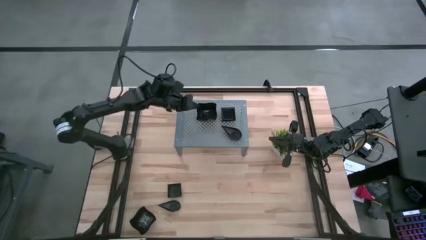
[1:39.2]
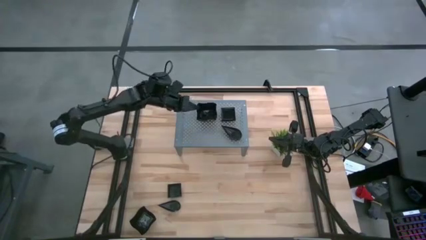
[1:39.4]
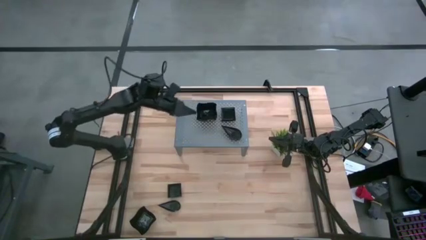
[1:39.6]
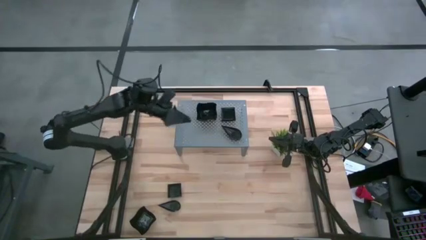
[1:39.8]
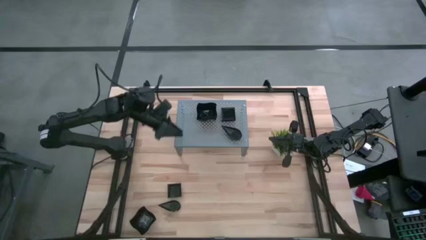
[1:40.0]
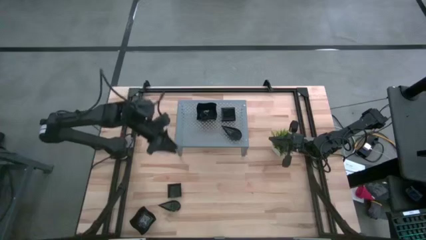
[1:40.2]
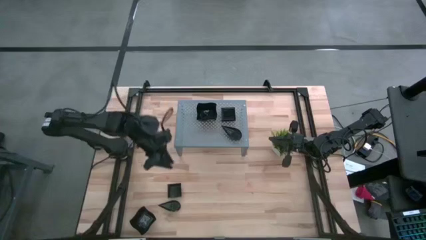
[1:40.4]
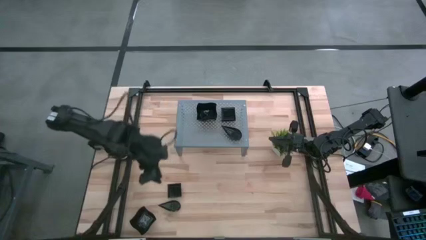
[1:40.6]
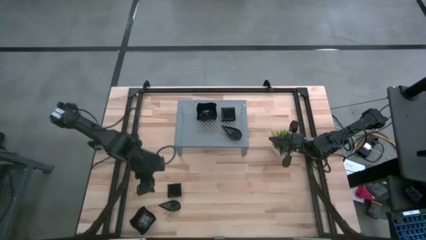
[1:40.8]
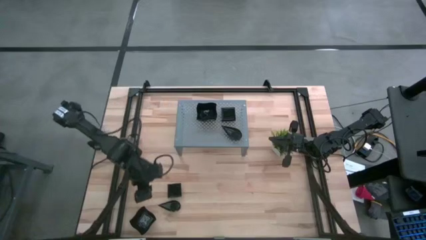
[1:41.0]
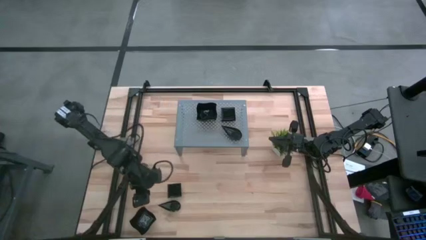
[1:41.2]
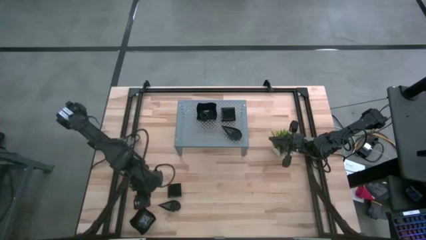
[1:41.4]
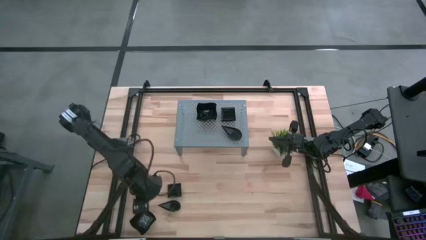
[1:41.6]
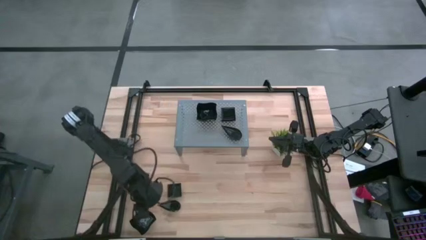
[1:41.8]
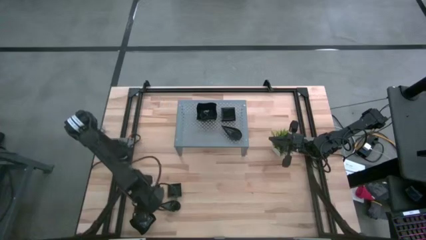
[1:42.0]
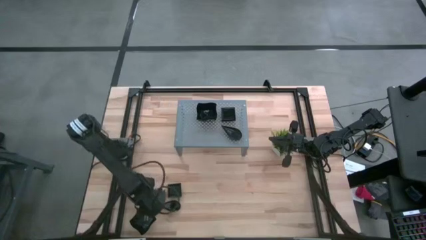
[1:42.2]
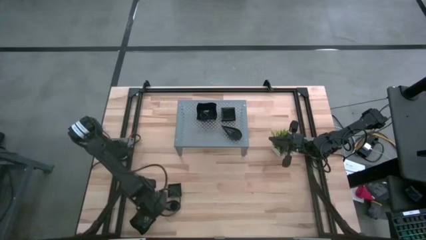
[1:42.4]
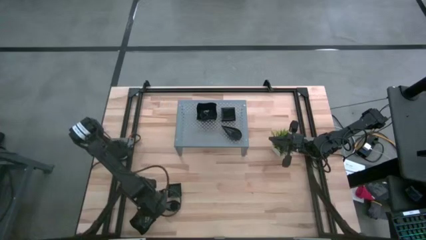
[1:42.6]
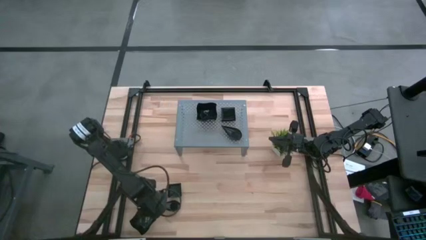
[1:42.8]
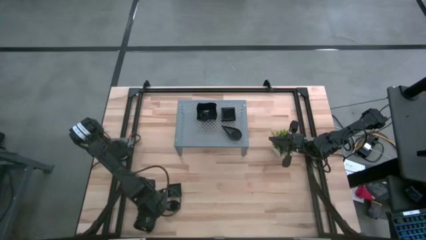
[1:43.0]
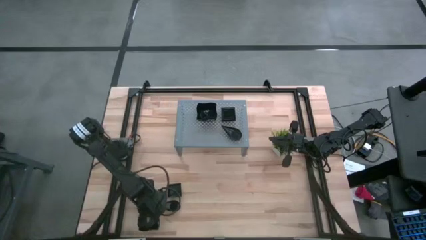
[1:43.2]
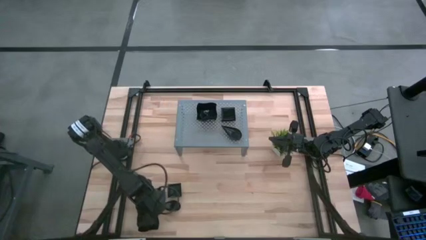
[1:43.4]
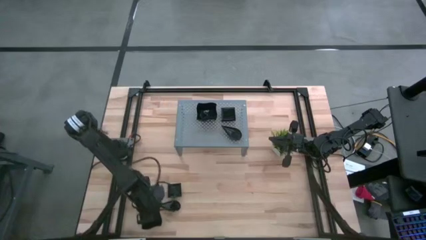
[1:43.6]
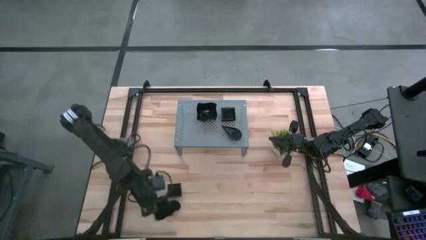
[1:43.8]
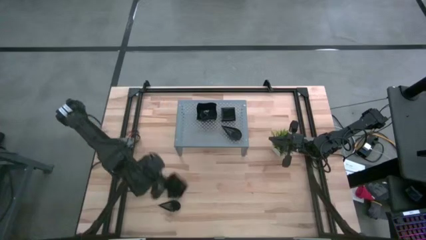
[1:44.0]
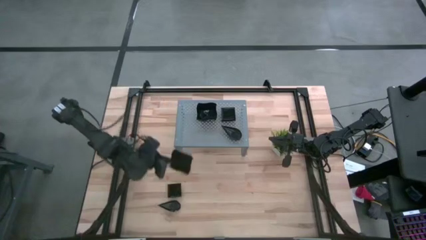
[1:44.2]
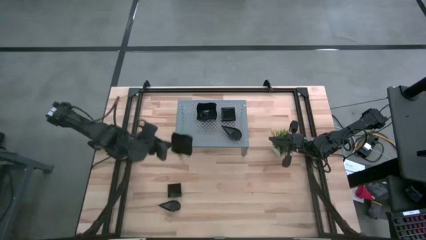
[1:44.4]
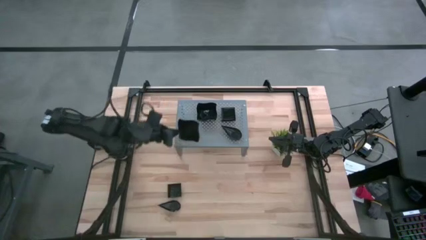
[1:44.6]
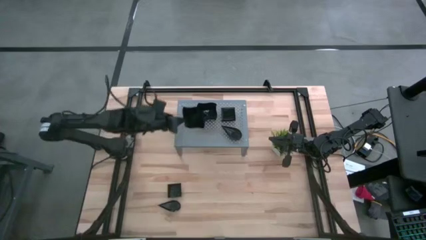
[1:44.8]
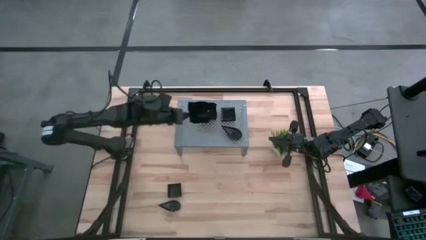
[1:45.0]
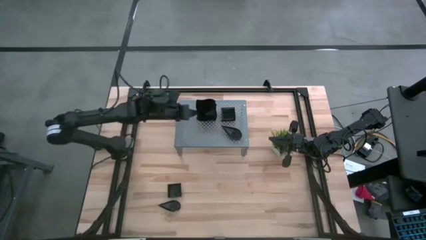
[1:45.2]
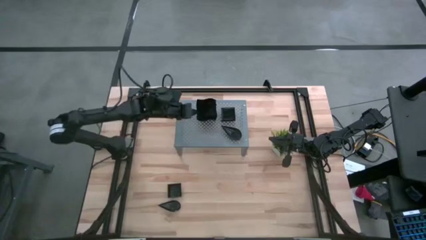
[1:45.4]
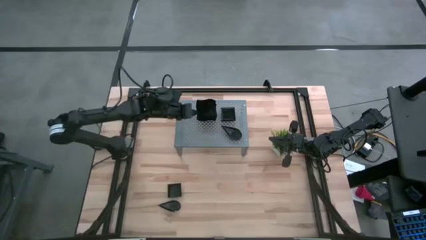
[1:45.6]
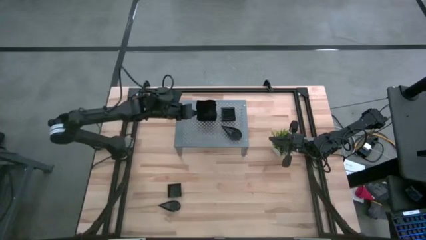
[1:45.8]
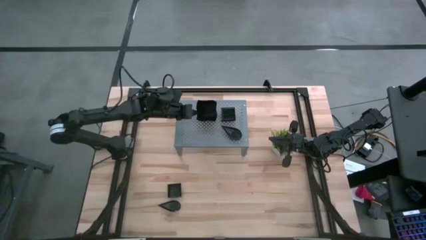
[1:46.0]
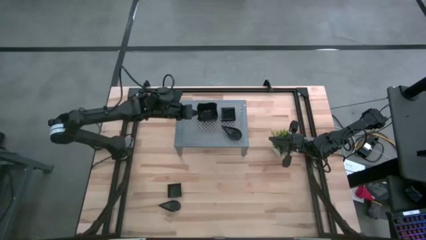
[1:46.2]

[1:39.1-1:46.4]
Task: Pick & Place Mini shaped plates
Stack the distorted square plate on top of the distorted square plate on the shelf

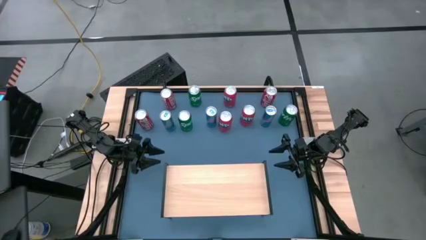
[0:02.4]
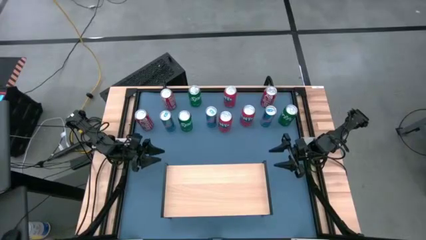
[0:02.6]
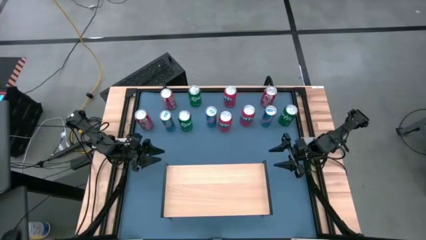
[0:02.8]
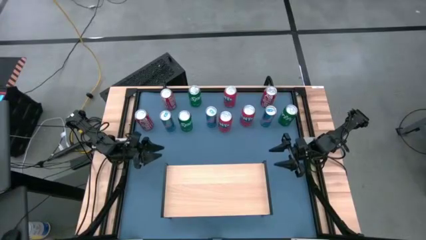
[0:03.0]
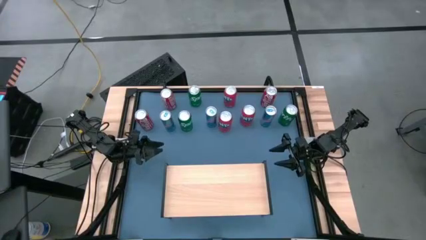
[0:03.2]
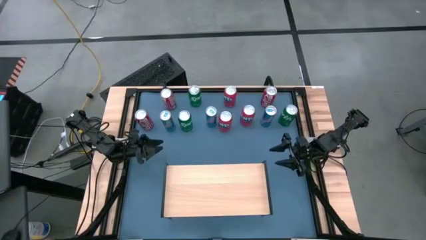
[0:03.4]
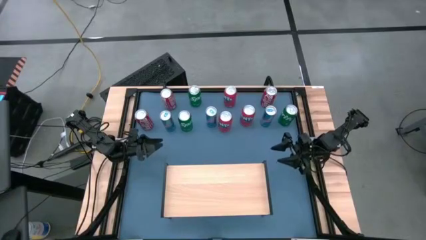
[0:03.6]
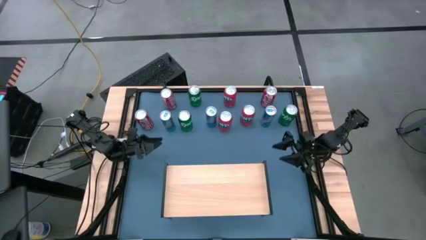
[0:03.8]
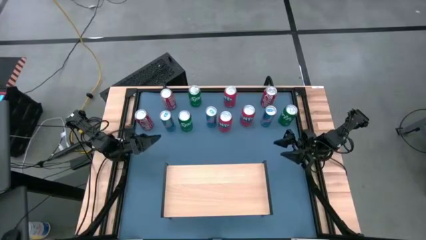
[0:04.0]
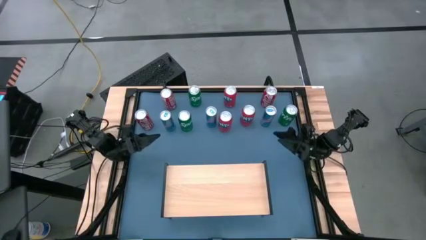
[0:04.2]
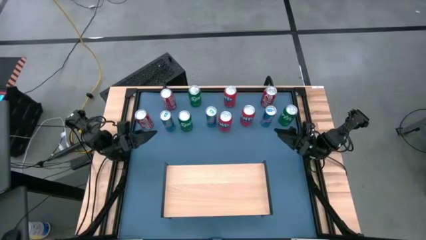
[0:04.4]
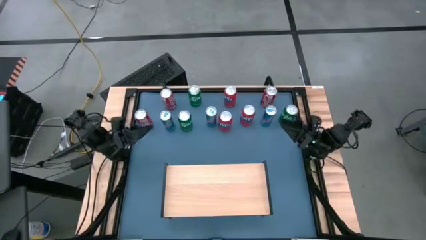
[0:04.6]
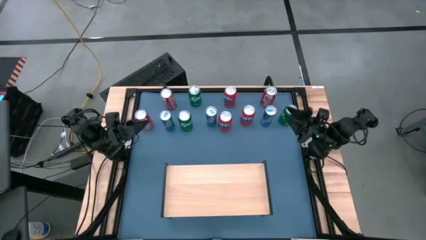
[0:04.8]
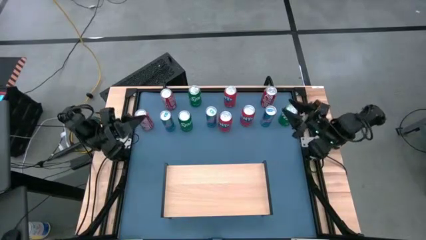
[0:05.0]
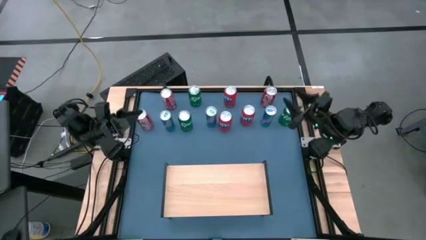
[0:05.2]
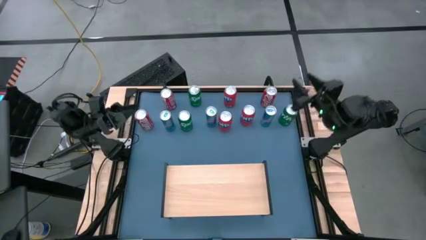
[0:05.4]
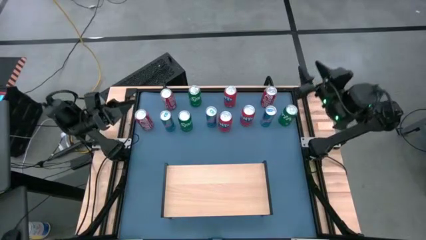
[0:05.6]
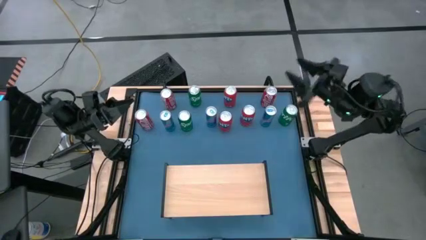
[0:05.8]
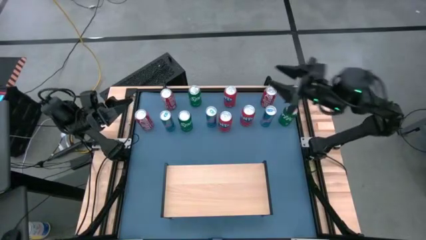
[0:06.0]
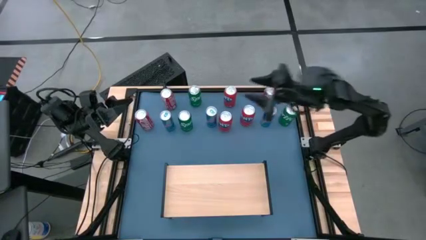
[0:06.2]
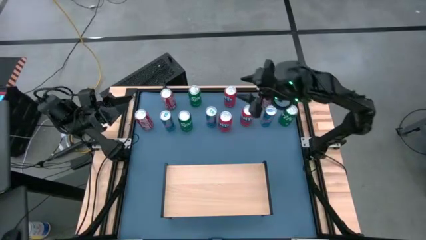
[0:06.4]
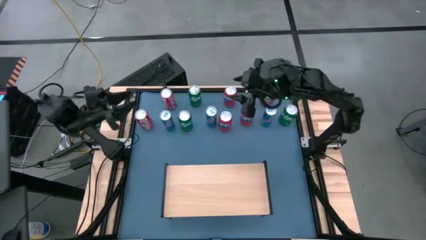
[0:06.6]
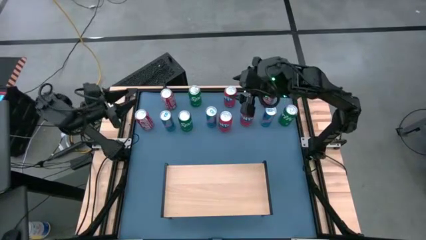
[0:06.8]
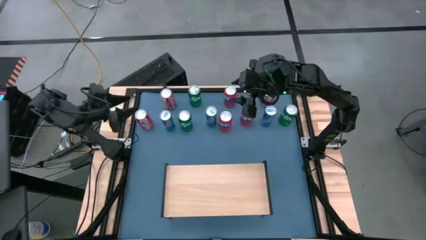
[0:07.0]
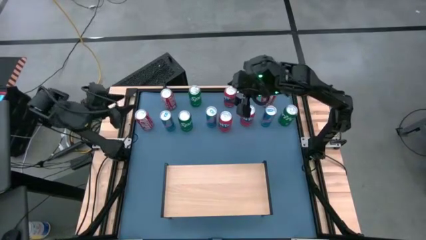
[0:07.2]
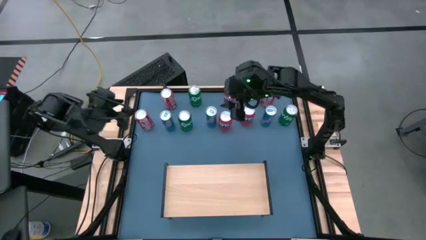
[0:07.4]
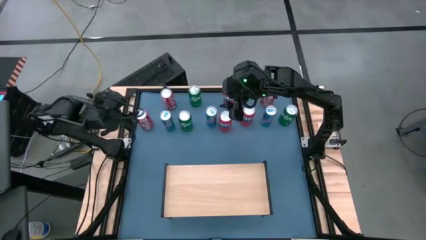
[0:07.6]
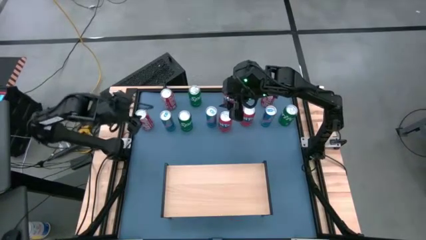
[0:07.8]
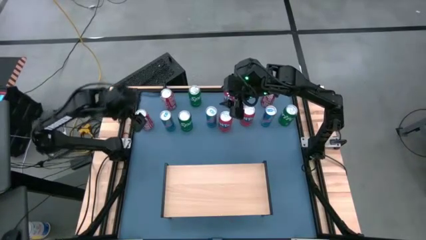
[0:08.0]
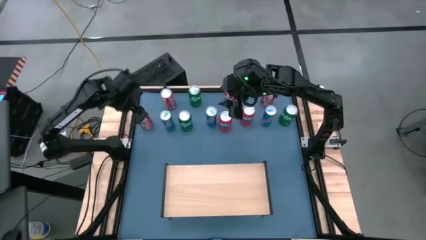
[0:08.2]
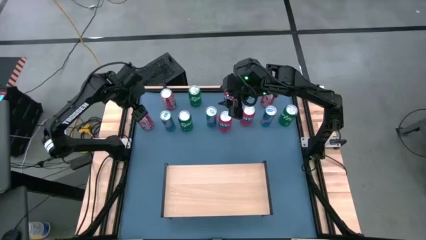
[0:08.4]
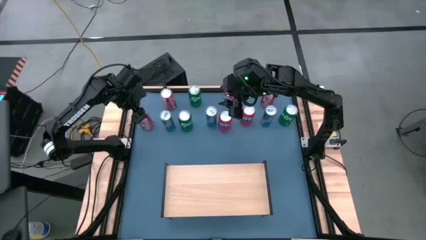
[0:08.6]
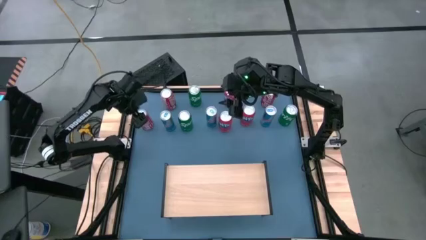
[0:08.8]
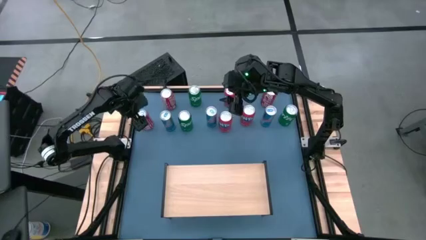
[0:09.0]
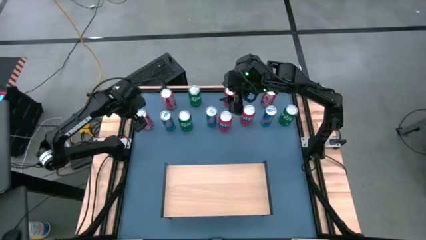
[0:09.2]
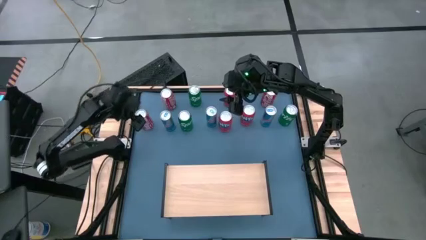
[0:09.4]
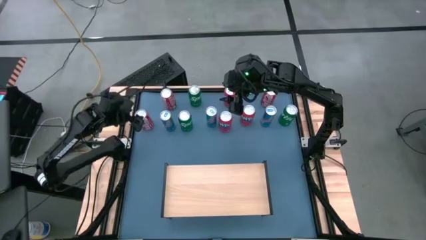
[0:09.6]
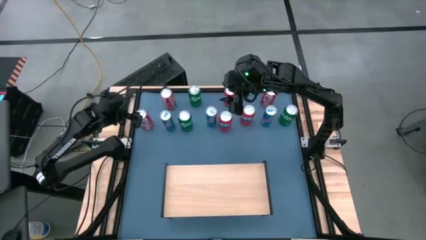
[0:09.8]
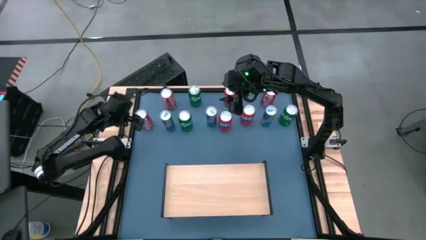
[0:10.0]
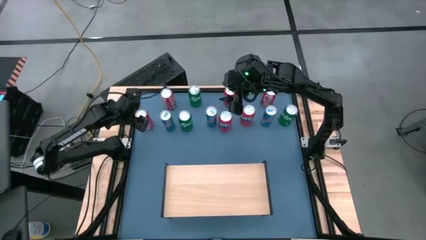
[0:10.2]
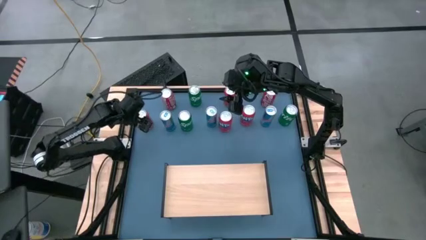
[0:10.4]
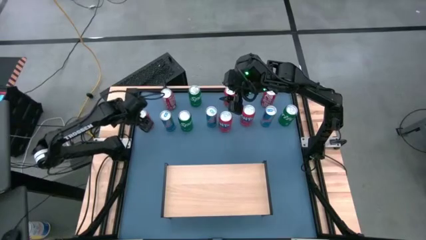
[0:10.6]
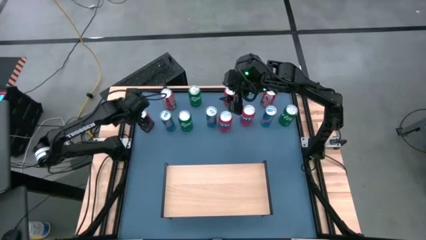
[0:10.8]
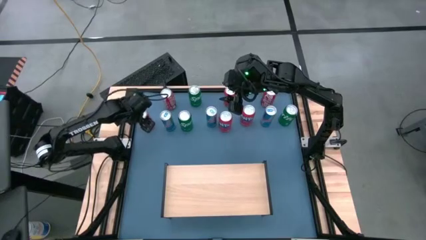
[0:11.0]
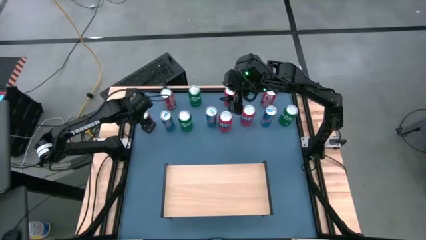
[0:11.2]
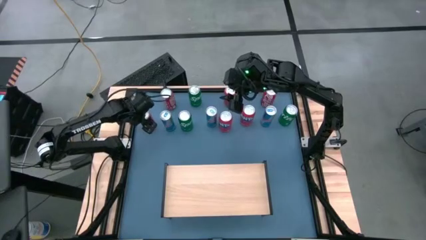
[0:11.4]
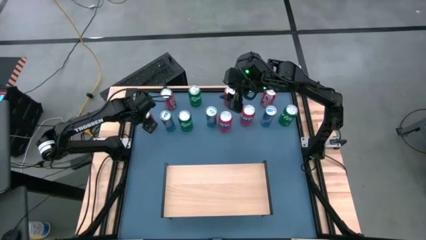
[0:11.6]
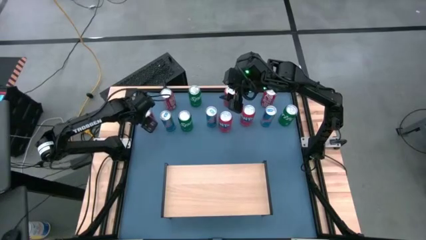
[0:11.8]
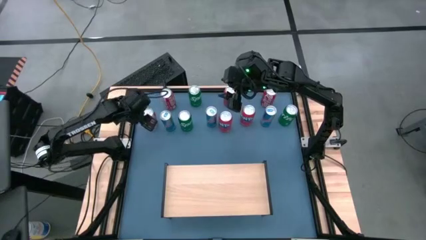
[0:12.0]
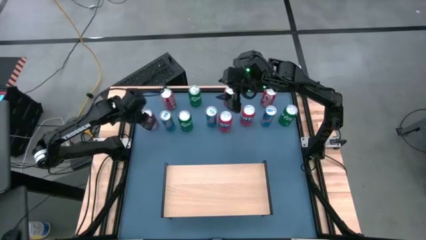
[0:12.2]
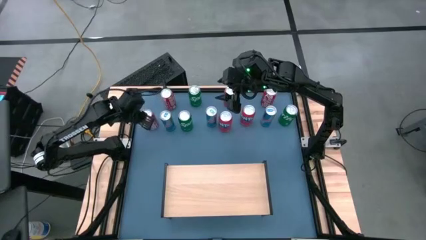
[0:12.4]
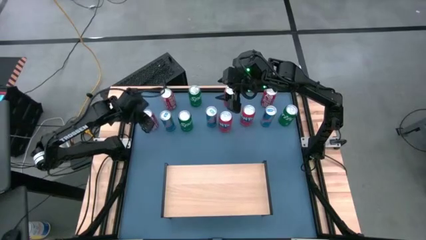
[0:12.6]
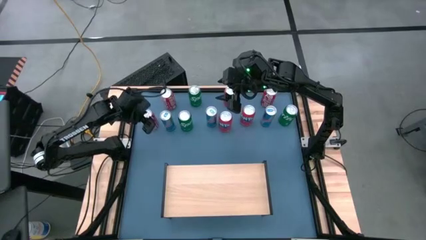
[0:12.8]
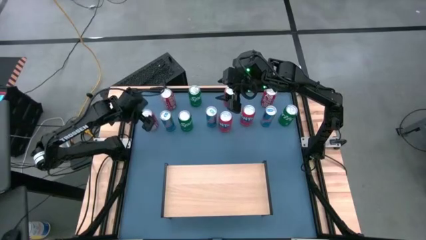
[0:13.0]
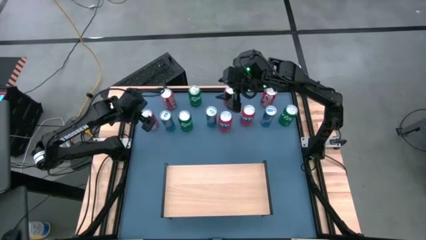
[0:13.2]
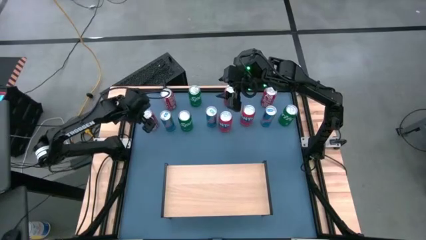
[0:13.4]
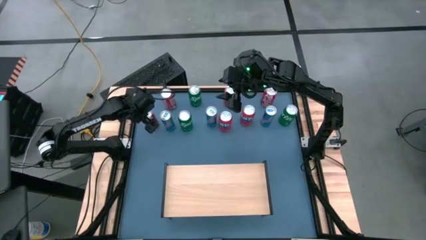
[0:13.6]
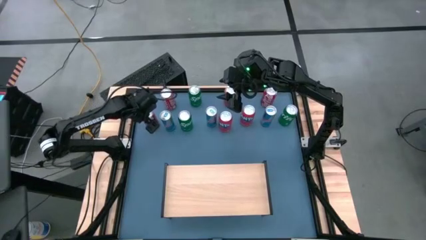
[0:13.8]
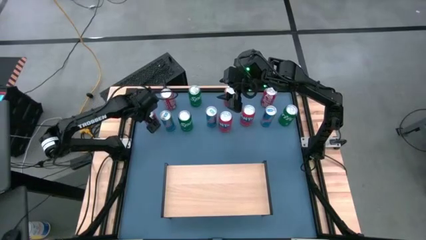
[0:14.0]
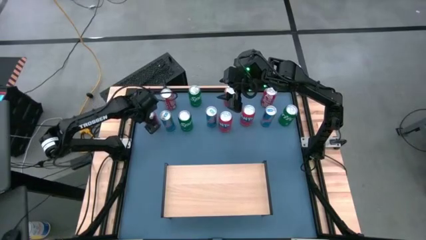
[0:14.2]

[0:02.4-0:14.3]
Task: Place canned beverage on shelf
Put the bottom red soda can on the shelf
